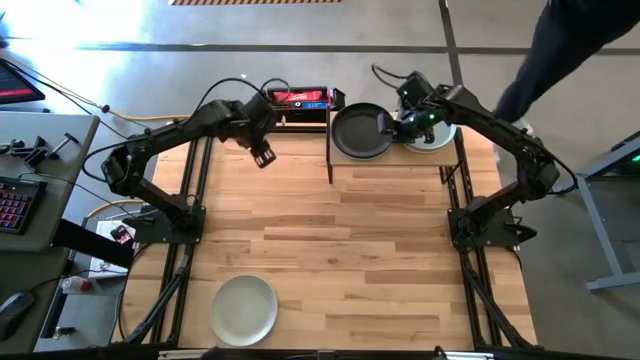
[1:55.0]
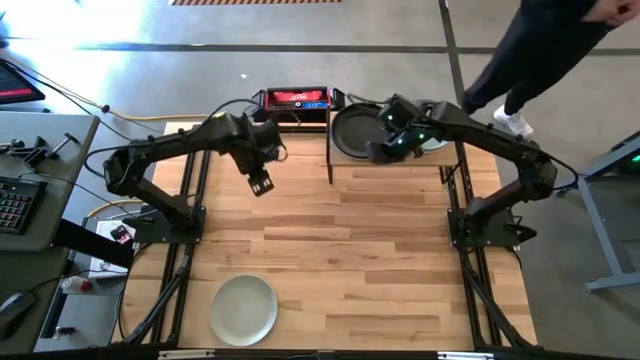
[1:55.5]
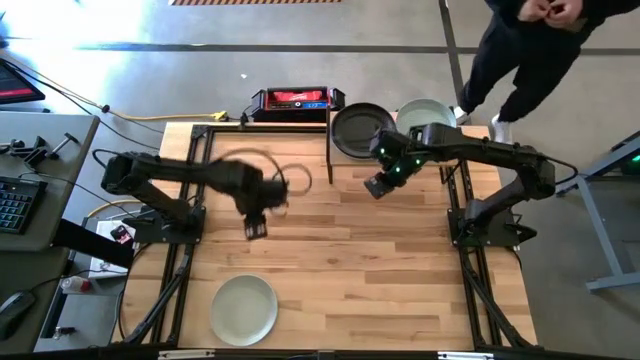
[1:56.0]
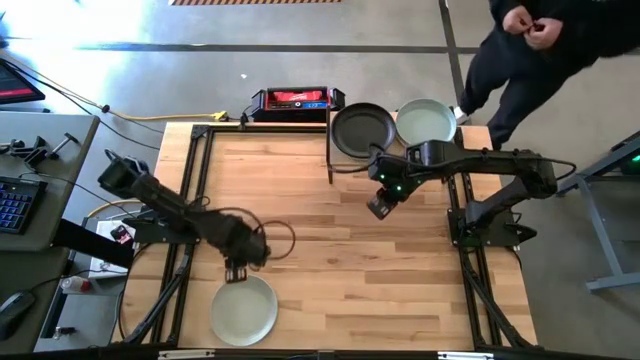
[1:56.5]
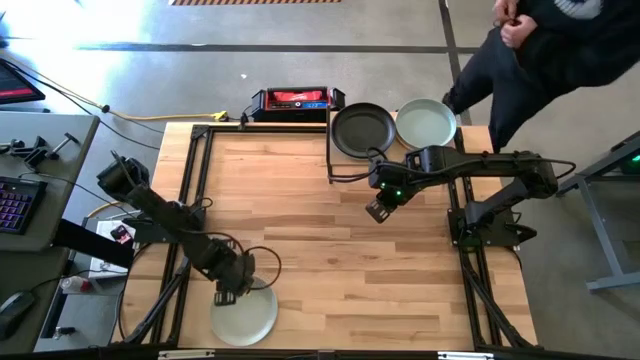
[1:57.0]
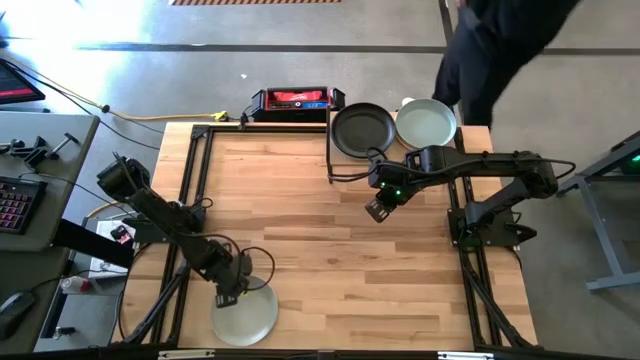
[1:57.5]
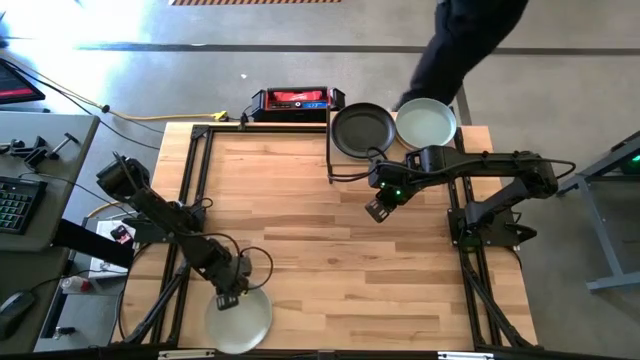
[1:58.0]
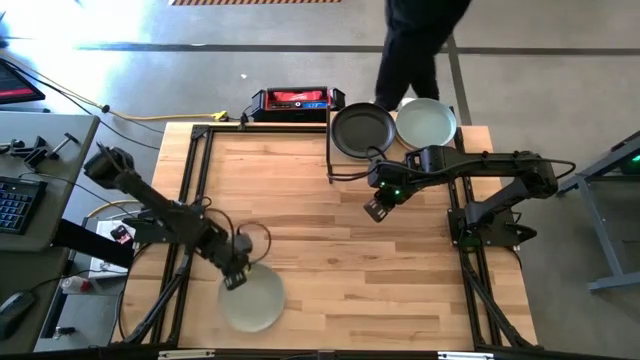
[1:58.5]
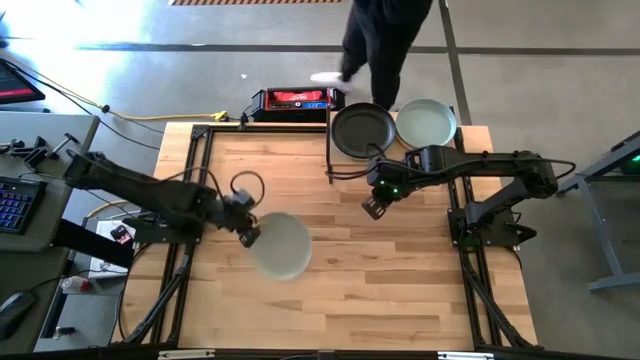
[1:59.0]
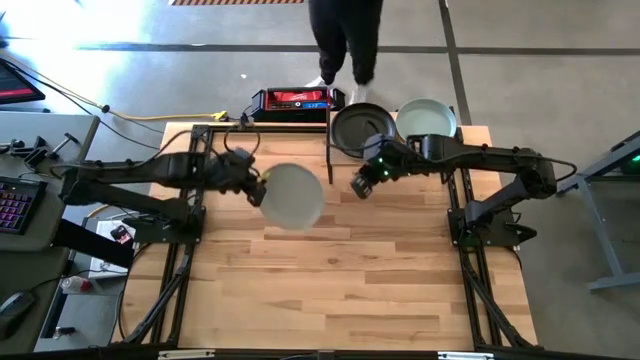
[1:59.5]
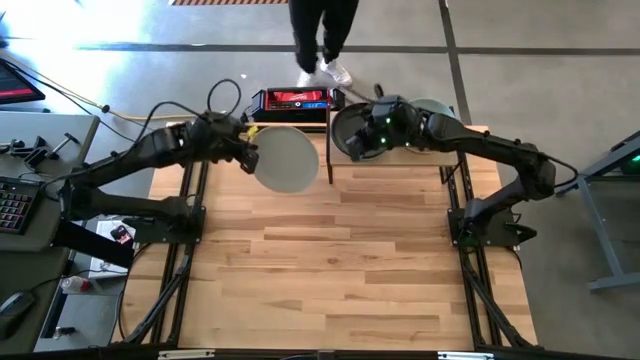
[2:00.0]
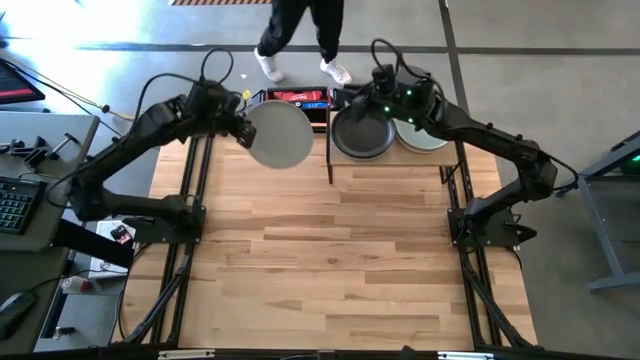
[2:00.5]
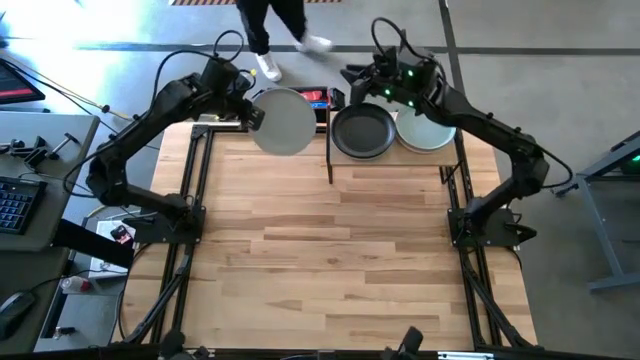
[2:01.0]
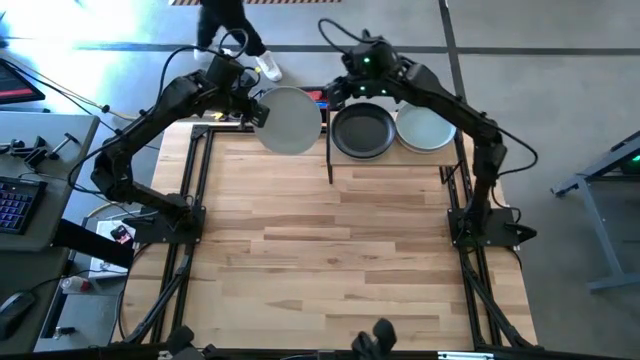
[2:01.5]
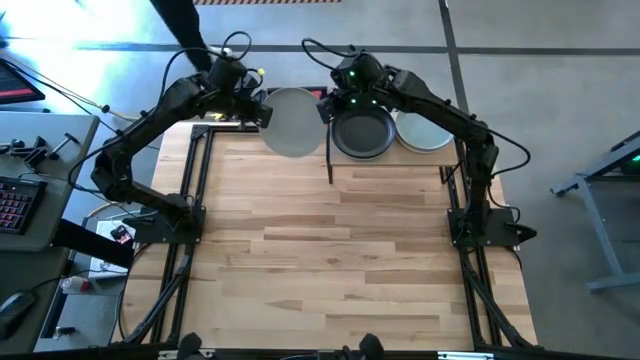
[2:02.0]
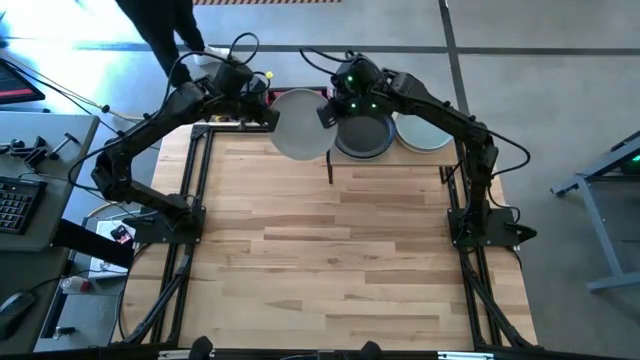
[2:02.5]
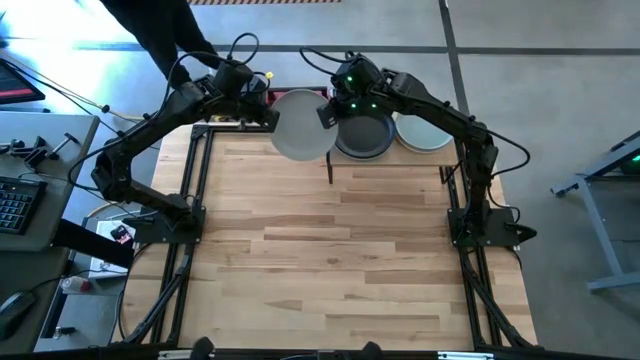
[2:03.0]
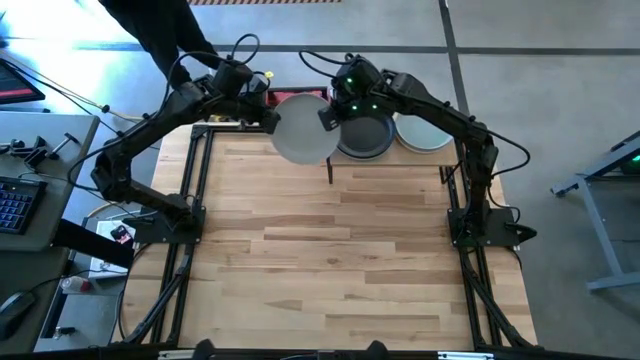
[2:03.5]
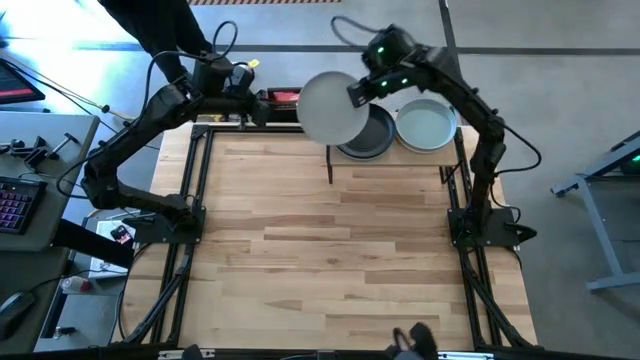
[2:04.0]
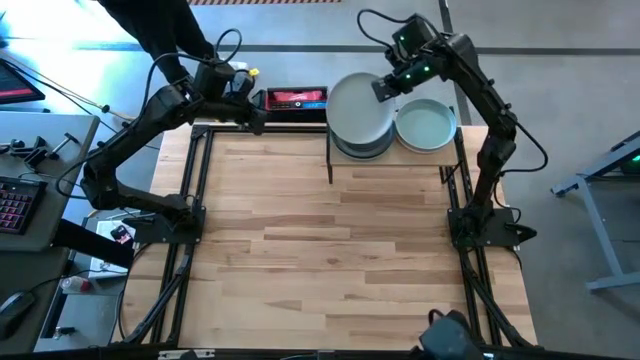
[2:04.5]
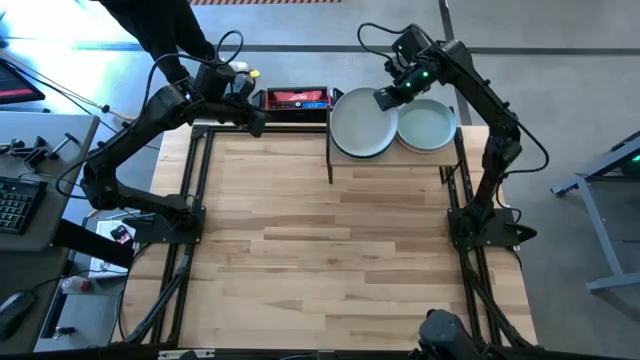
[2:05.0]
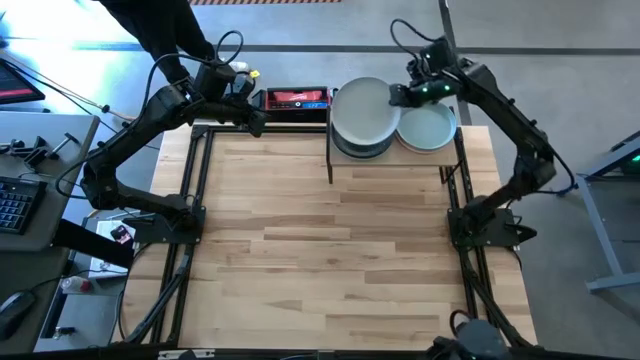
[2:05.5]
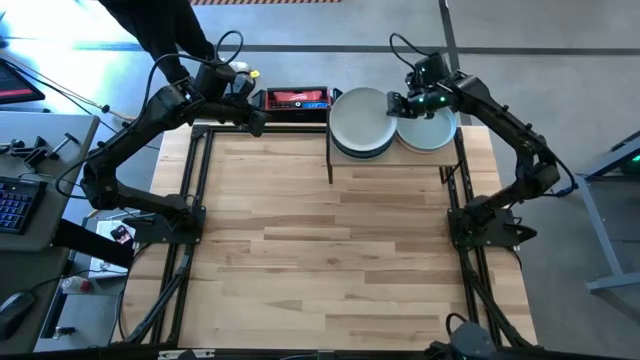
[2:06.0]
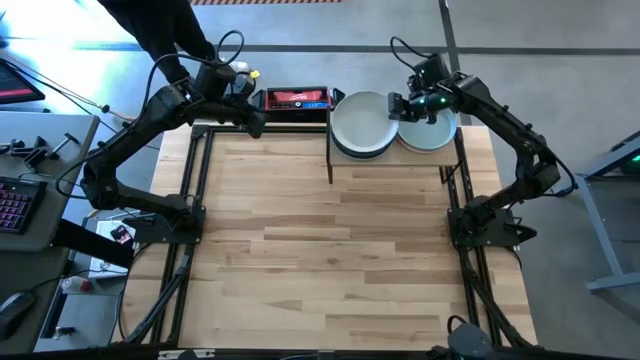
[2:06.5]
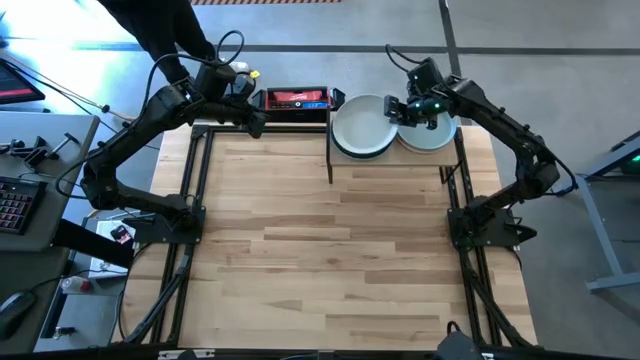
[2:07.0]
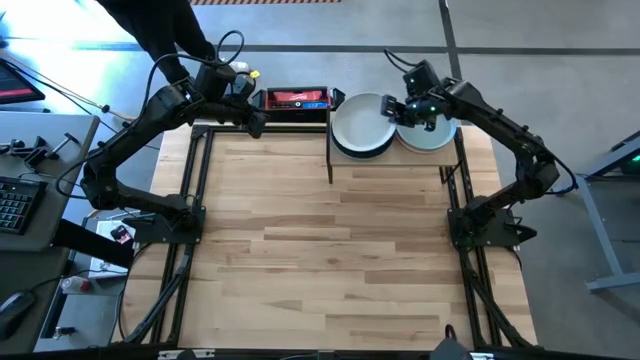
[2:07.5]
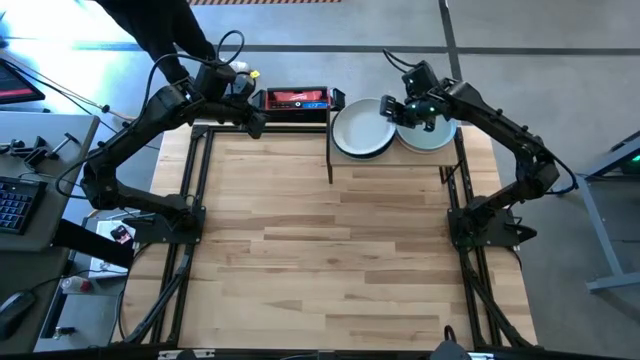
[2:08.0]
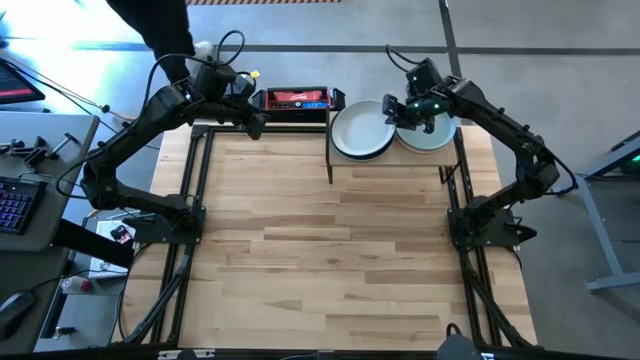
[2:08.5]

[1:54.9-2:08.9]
Task: Place and stack plates onto a shelf
Stack the gray plate on top of the black plate on the shelf

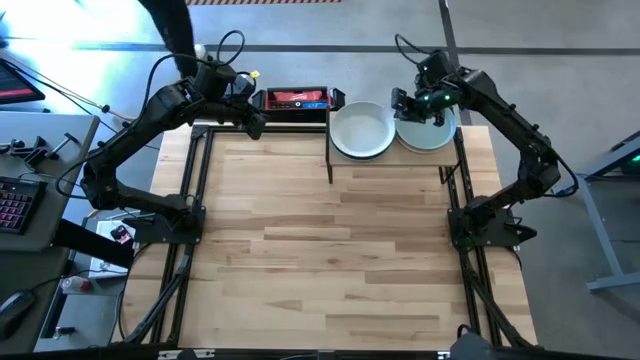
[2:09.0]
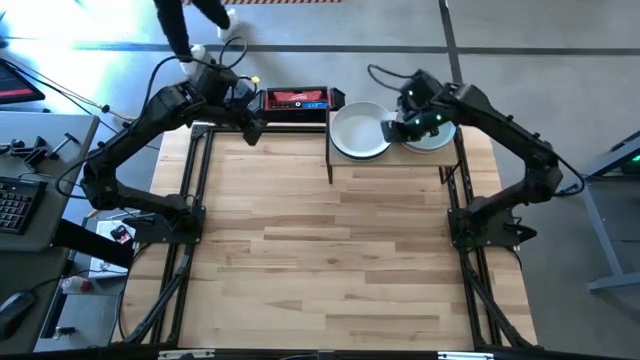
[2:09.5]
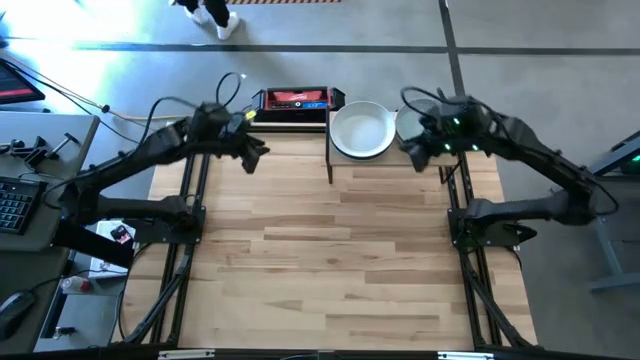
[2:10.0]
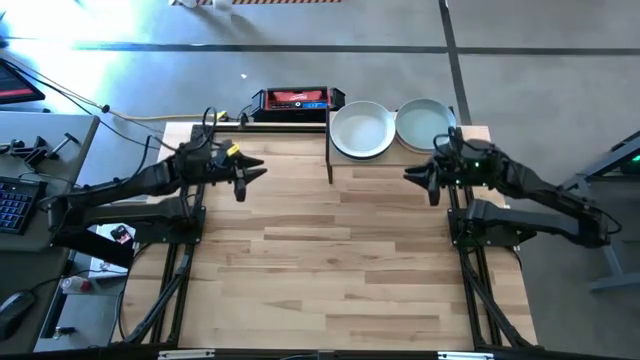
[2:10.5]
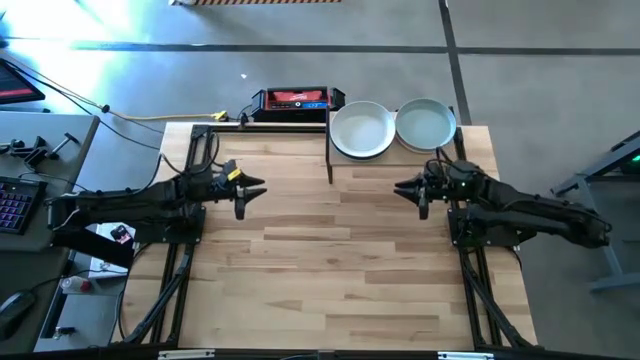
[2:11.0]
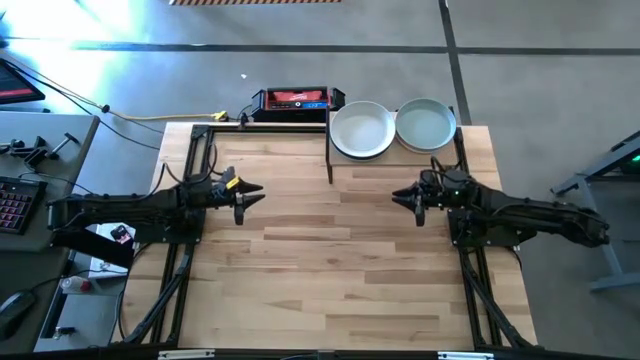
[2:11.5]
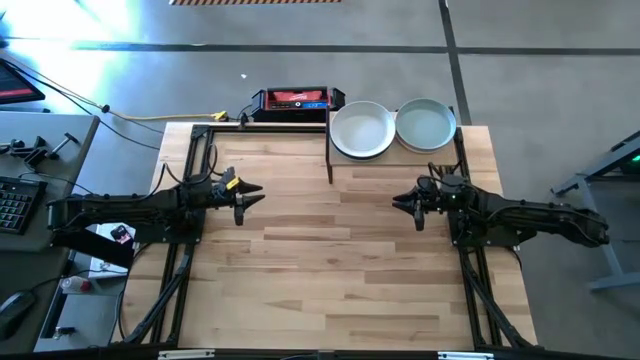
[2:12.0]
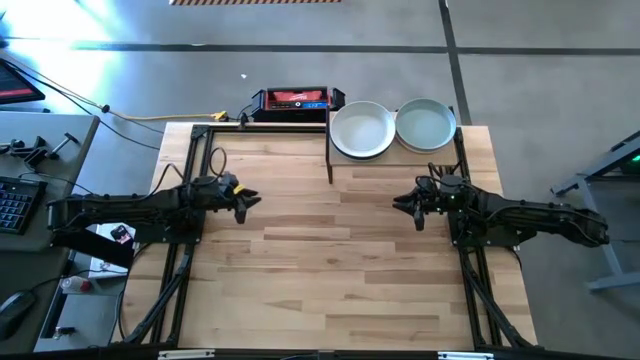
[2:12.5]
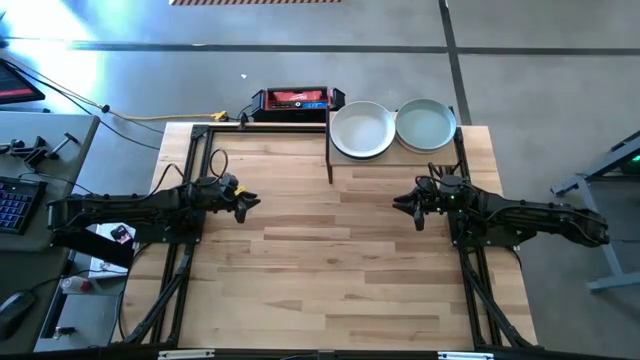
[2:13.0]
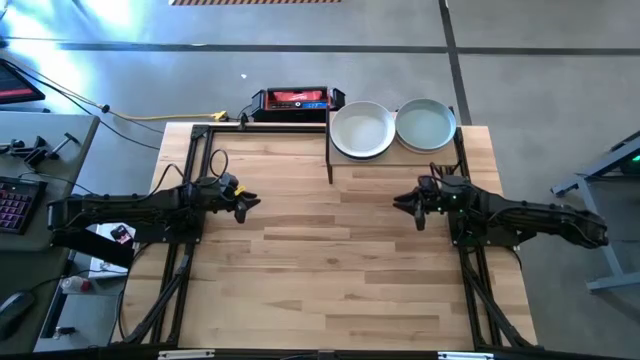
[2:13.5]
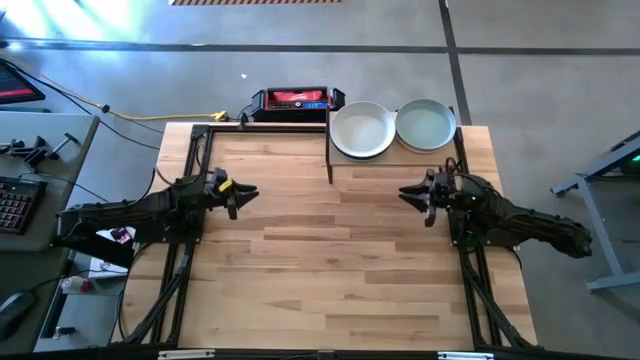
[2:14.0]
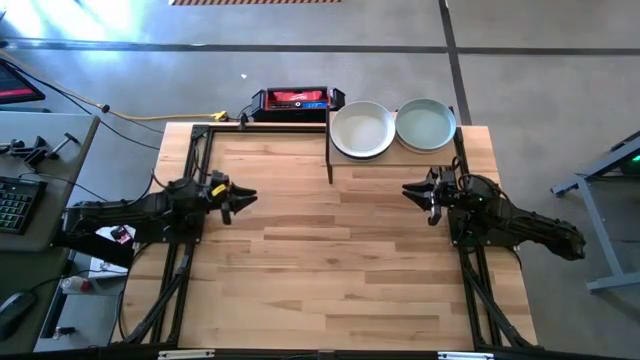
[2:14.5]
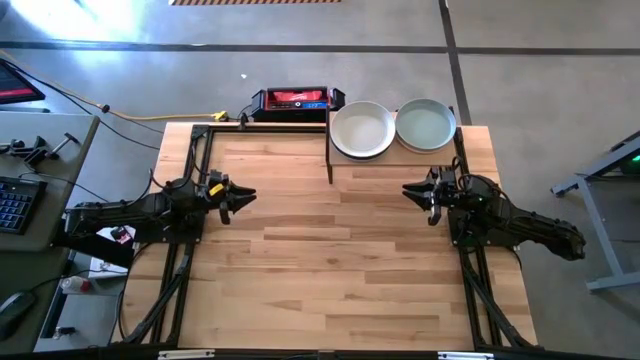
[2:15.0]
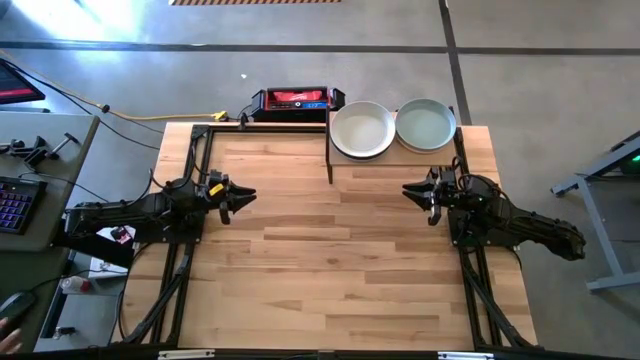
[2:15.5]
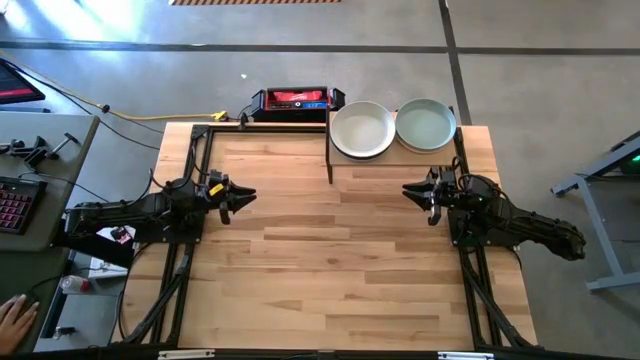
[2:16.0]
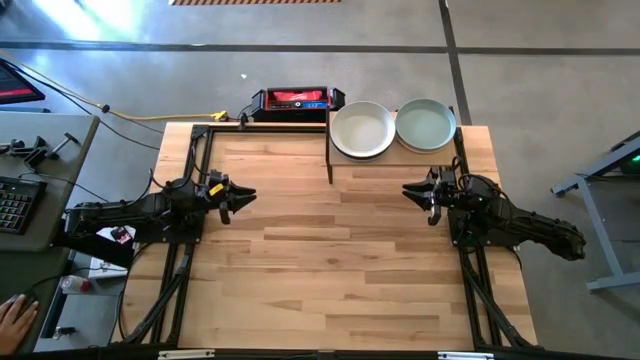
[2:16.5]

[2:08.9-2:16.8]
Return to Home Position
